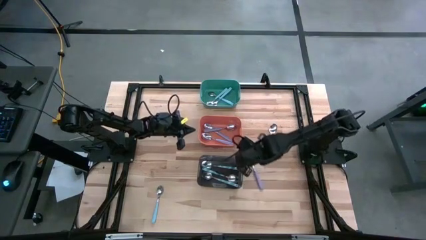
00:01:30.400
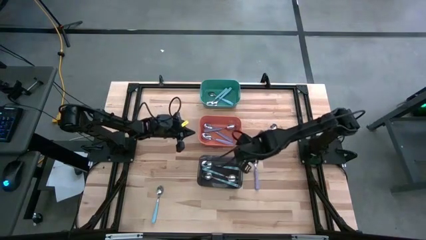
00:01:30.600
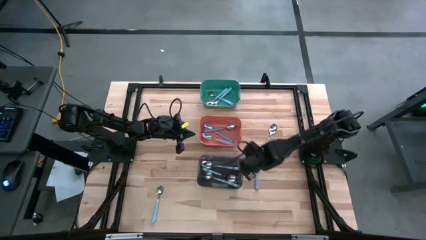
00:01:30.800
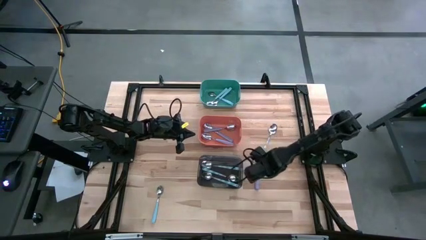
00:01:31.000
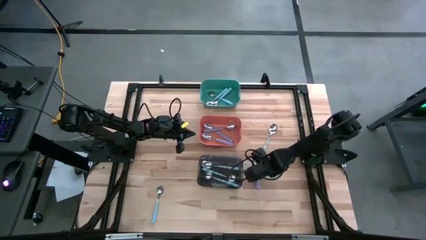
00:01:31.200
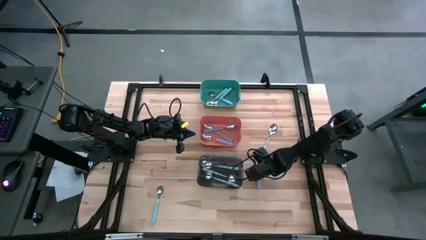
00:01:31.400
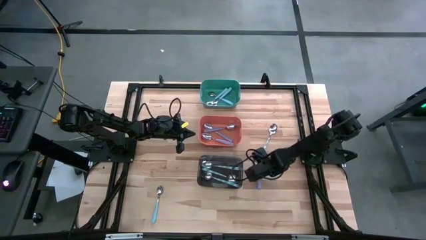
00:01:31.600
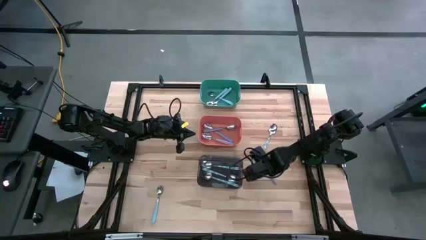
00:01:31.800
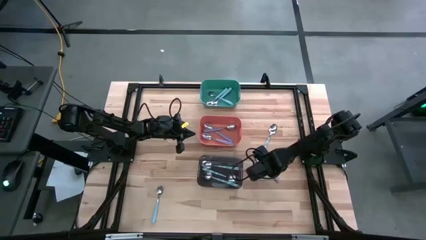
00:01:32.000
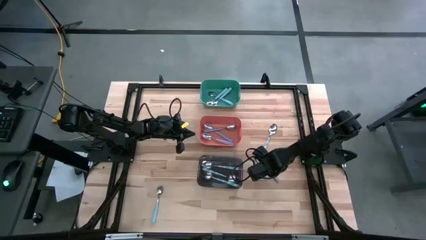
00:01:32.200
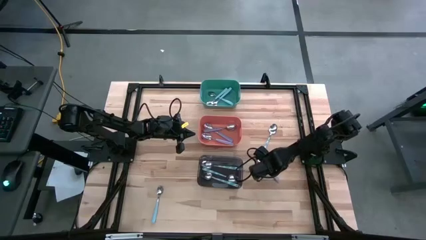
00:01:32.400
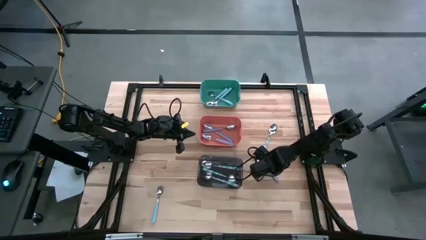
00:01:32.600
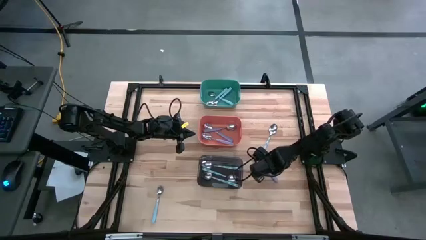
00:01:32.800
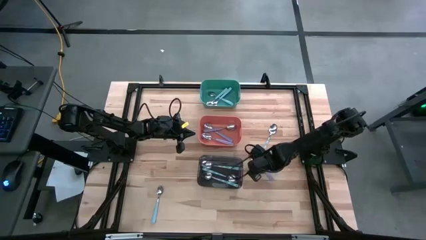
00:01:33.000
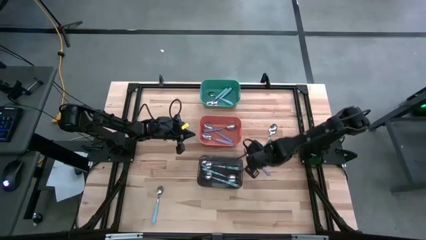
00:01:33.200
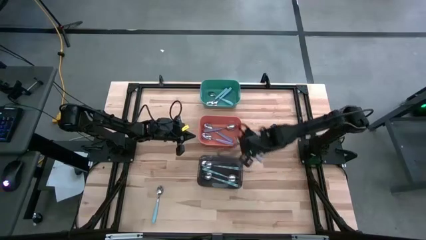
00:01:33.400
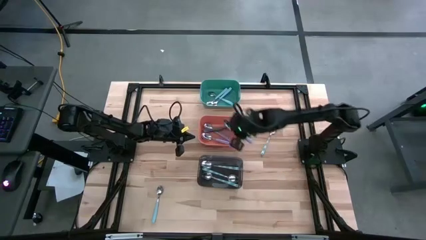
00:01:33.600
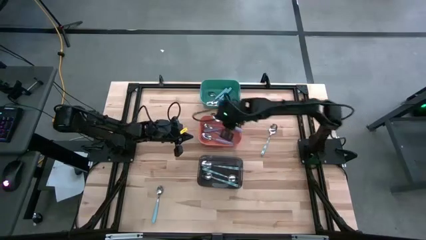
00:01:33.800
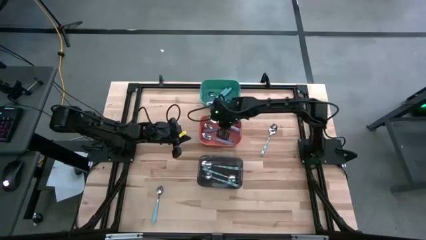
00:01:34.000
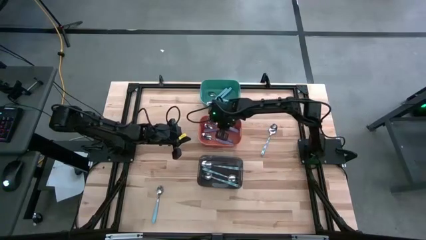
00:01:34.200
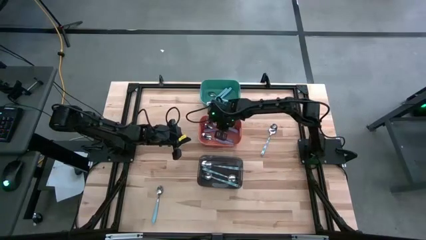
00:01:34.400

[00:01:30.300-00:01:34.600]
Task: Sort silverware by color (type)
Put the violet spoon into the orange bin

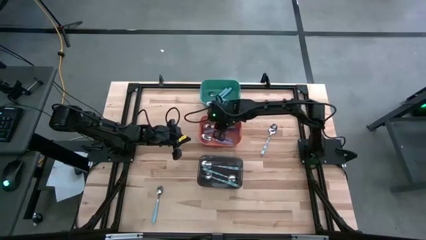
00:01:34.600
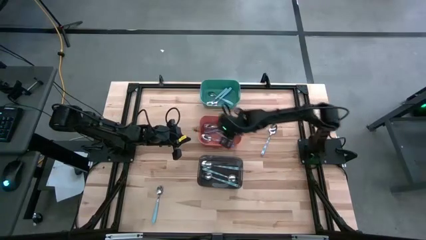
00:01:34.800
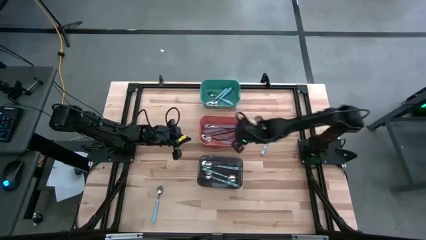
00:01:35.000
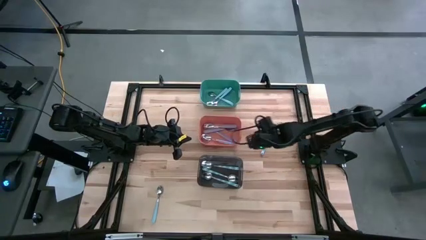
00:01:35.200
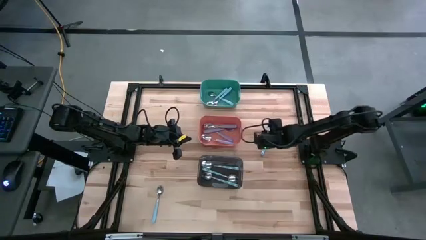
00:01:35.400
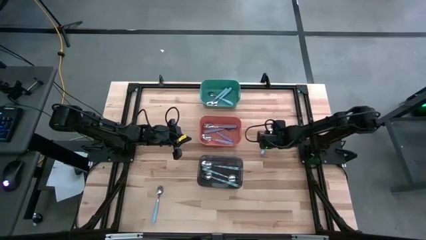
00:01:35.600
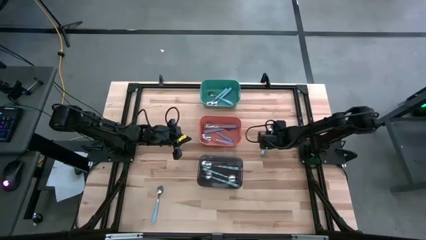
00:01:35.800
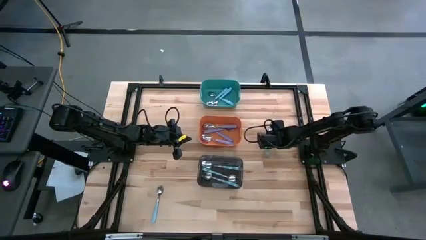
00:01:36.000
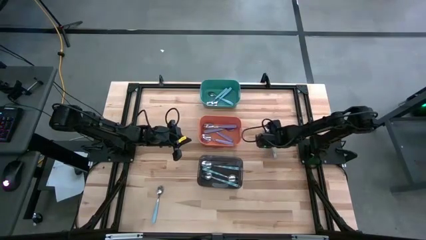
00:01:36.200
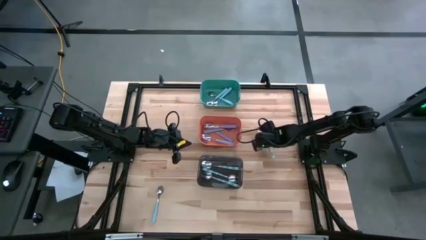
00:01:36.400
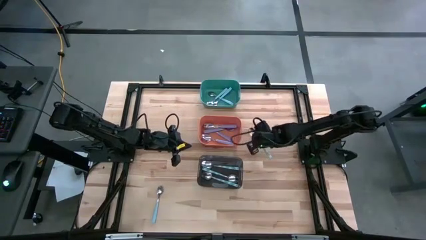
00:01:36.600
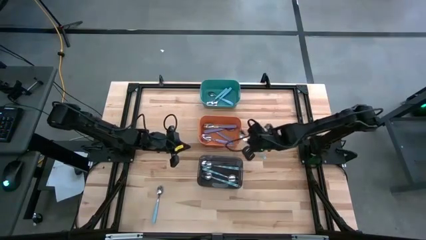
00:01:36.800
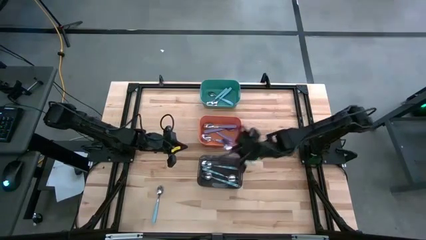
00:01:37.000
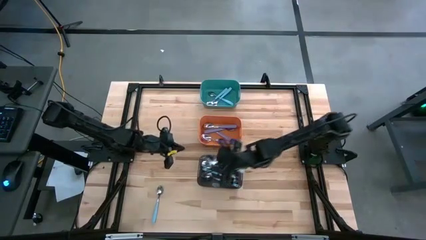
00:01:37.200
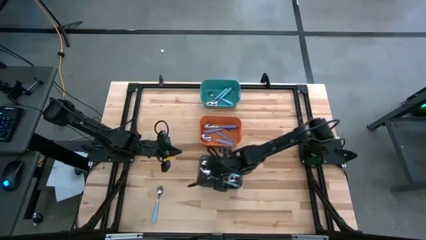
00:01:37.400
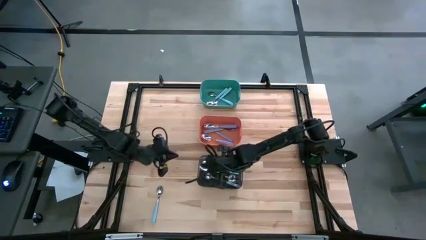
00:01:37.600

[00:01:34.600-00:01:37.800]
Put the white patterned spoon into the black bin

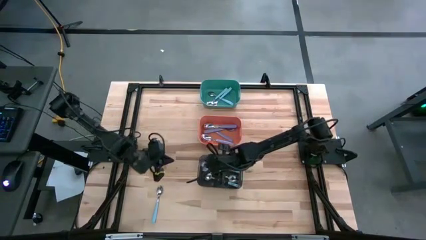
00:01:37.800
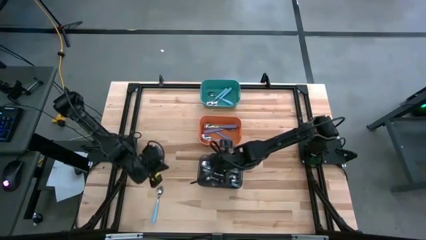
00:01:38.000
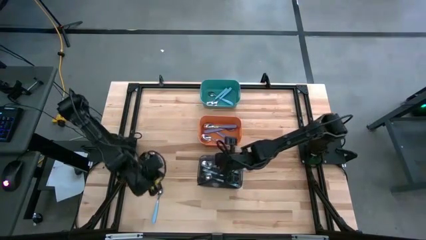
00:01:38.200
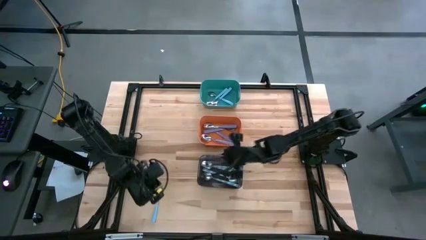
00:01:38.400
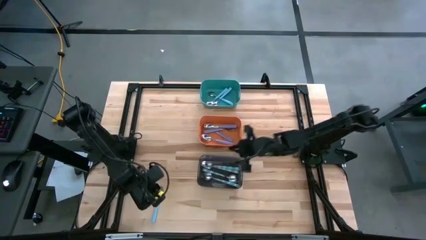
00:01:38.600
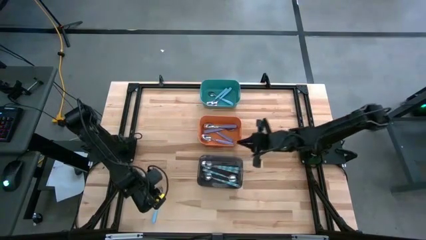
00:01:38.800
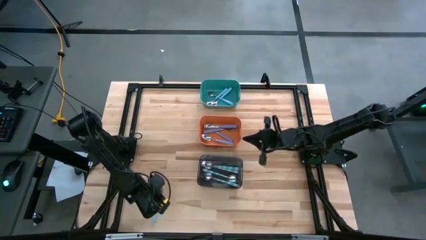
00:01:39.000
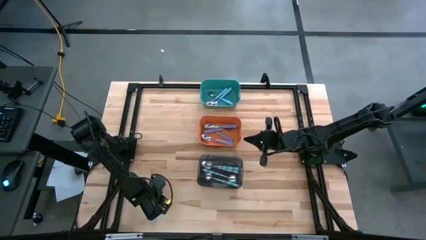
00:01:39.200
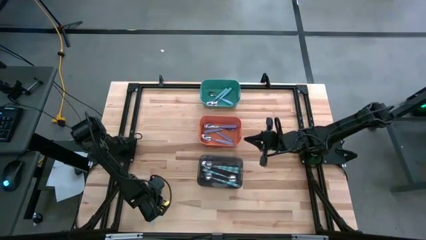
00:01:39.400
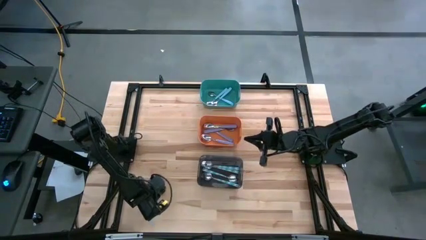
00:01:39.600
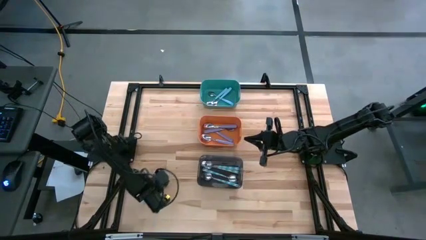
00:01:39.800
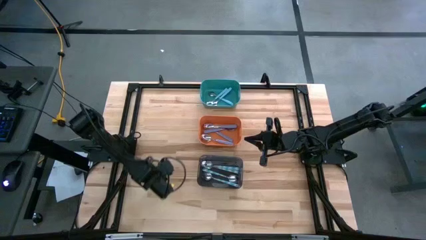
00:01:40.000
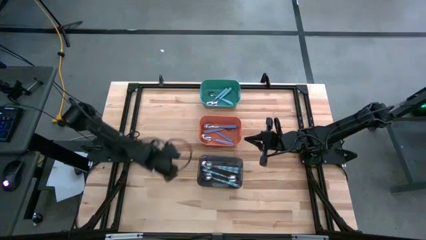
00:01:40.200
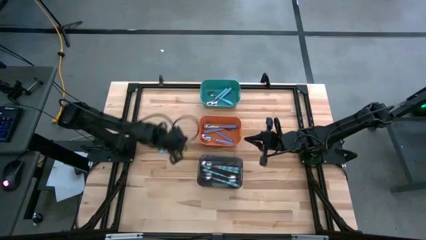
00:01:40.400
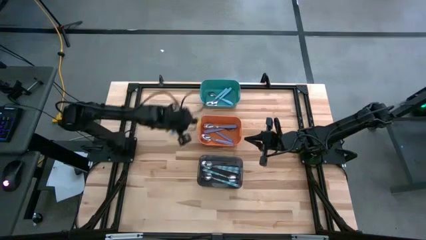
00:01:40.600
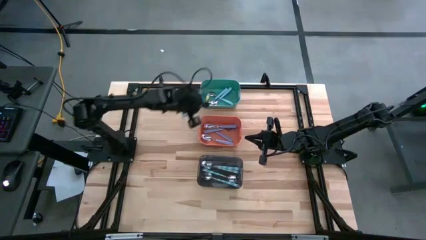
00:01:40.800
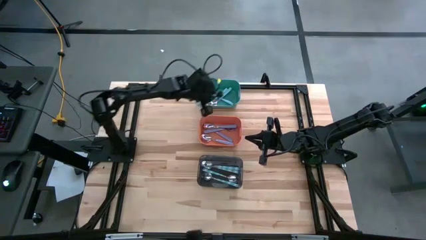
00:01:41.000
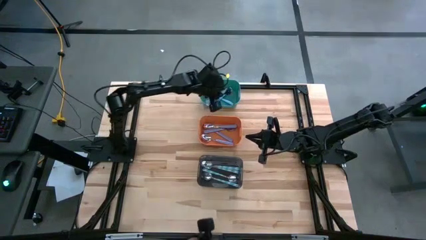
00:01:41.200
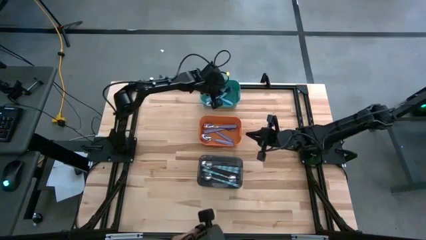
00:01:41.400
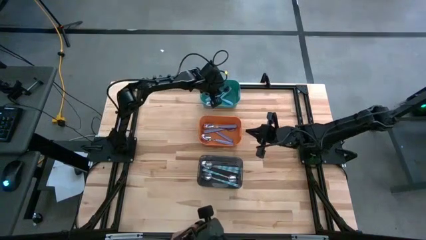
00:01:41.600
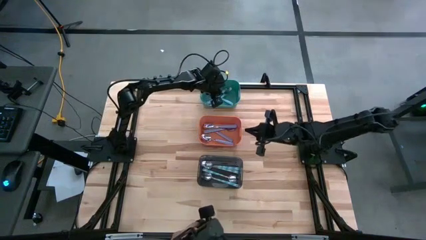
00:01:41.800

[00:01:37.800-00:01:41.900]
Put the blue spoon into the blue bin

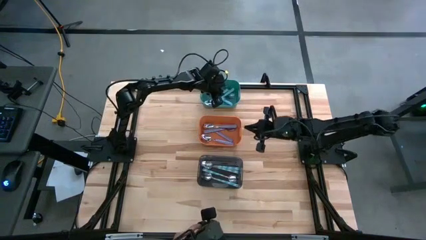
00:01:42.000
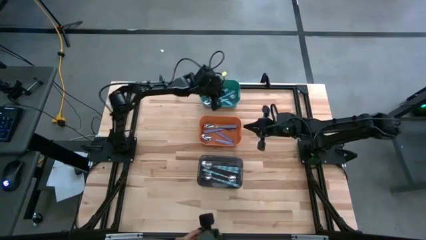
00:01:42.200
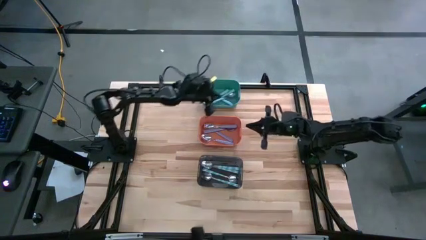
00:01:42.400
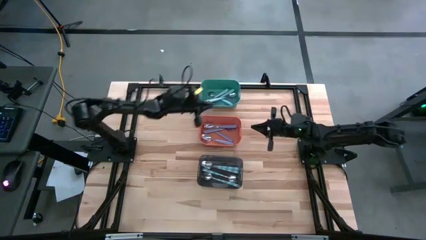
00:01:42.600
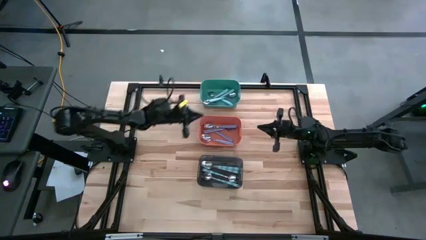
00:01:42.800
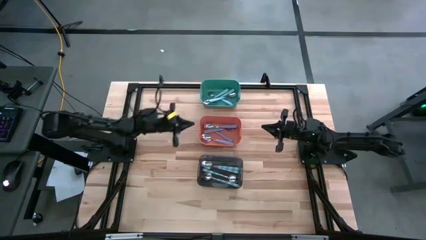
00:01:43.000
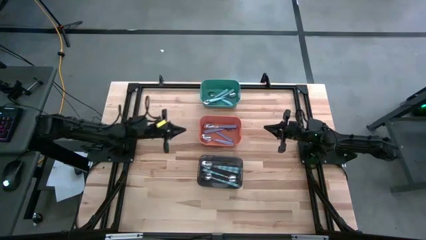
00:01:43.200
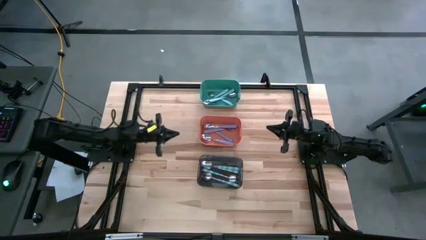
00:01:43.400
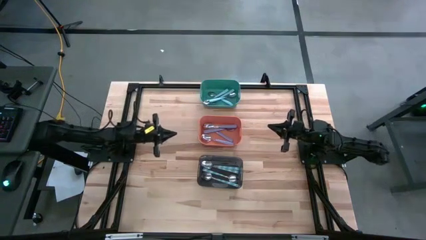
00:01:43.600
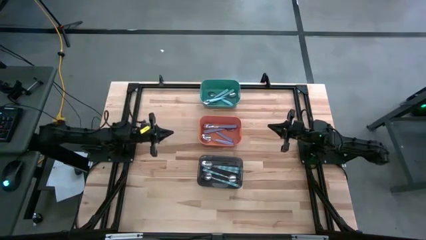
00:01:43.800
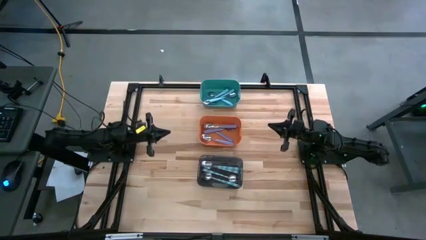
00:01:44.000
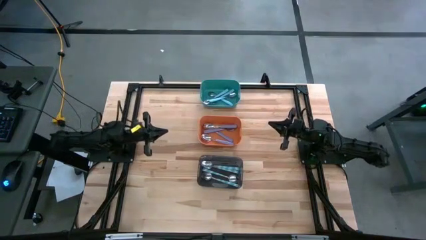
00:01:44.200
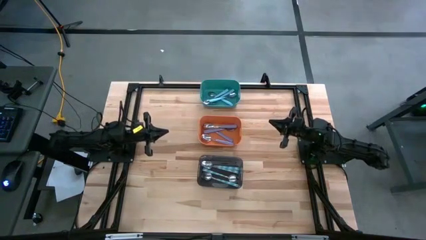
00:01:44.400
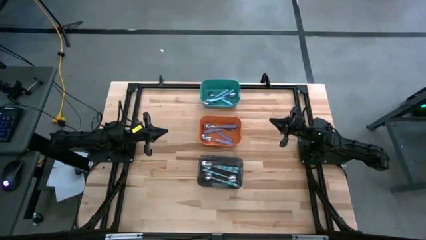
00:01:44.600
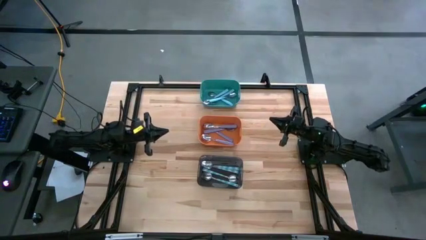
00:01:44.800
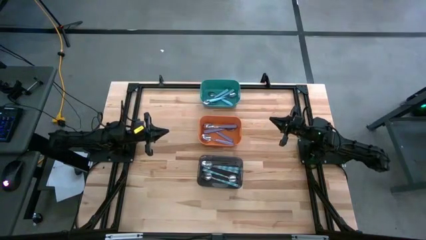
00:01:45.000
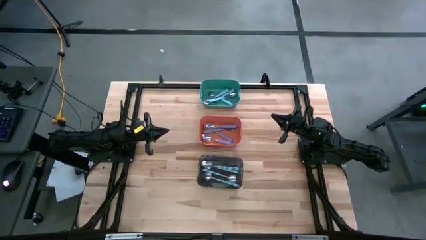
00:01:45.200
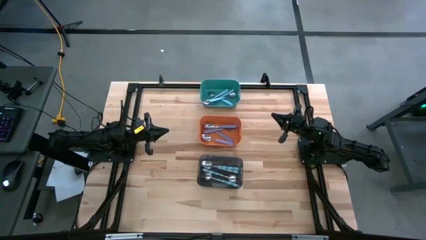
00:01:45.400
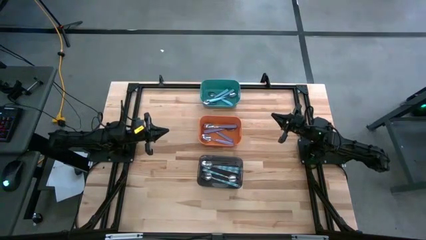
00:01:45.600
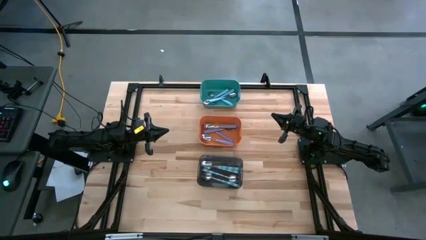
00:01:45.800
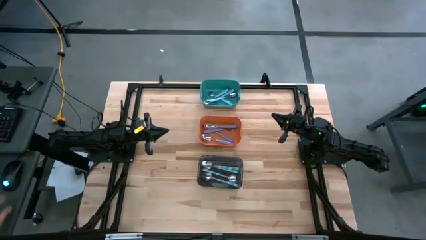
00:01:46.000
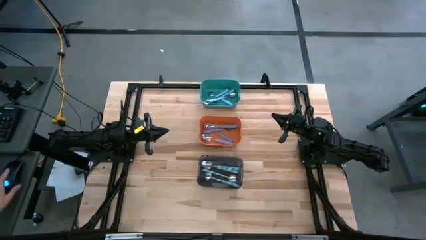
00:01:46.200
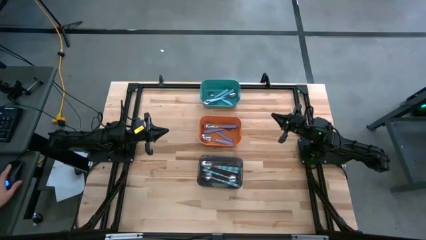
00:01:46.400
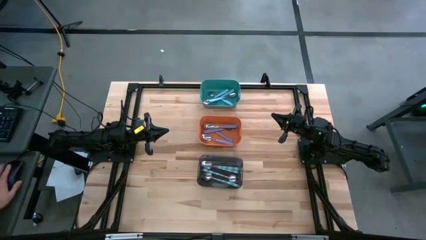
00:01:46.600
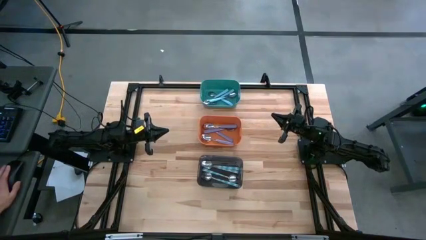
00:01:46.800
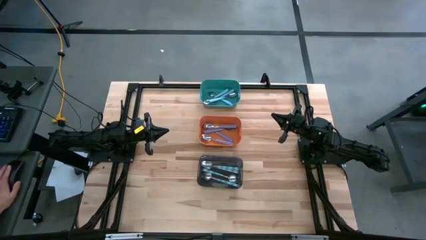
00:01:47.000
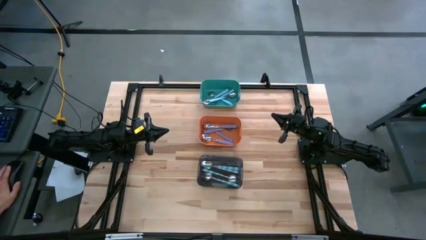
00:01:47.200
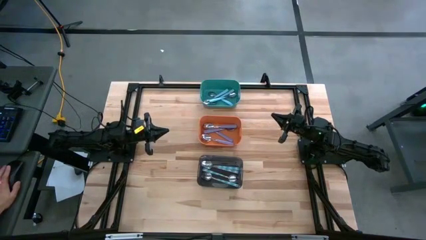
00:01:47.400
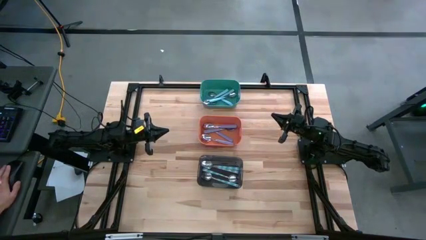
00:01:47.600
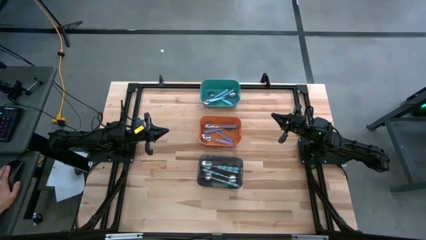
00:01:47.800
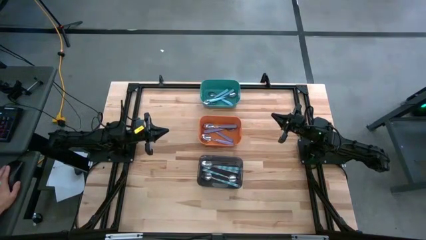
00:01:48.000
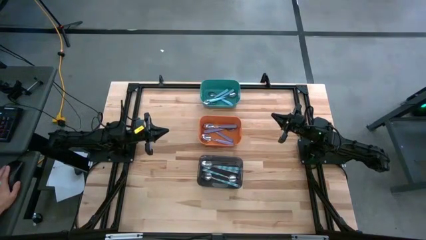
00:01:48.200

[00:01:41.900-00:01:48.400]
Return to Home Position
